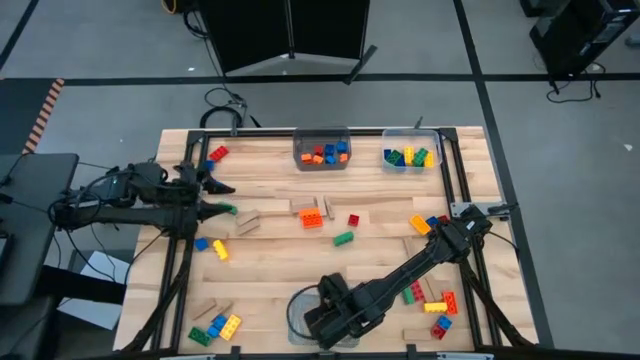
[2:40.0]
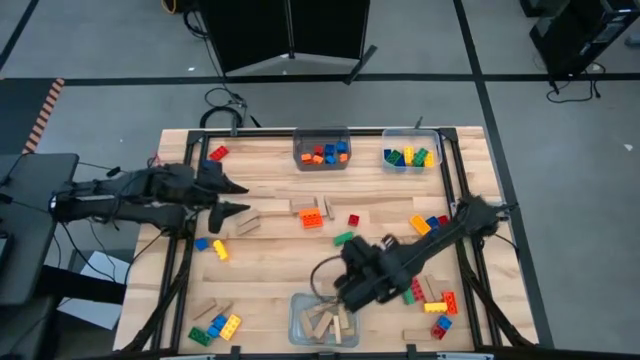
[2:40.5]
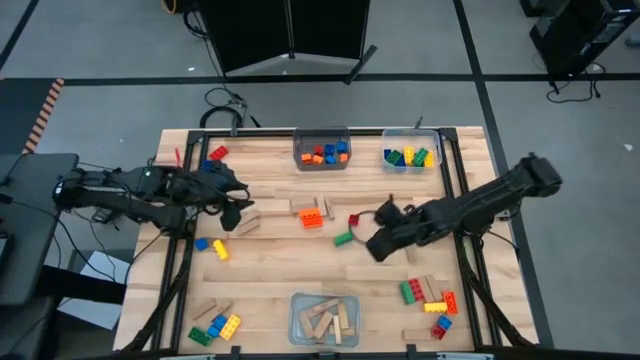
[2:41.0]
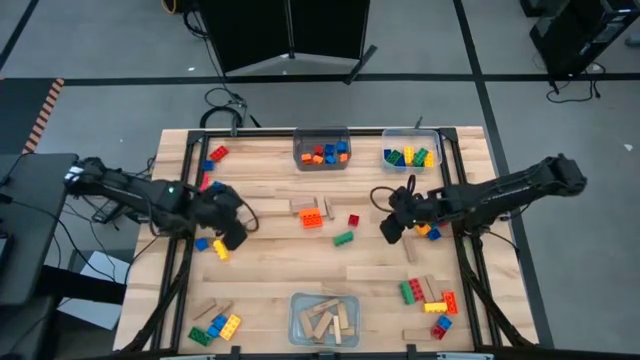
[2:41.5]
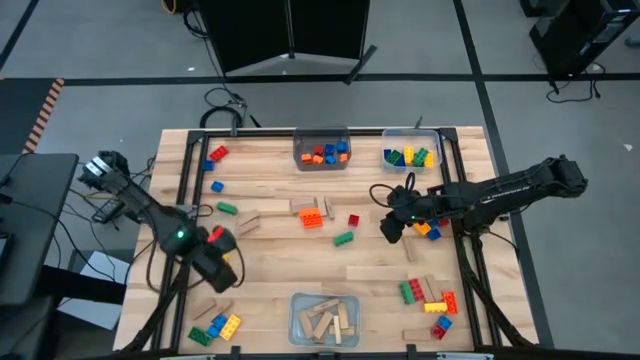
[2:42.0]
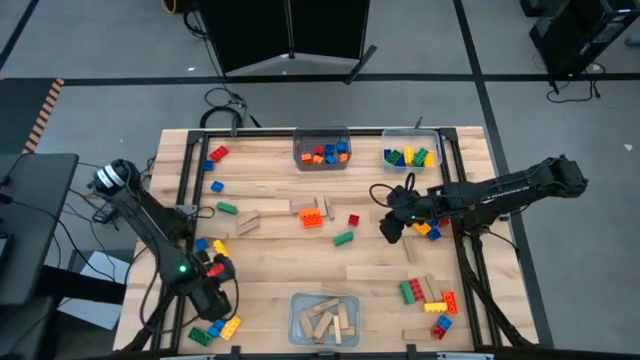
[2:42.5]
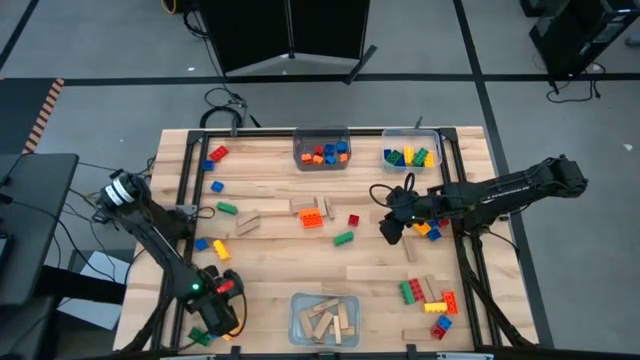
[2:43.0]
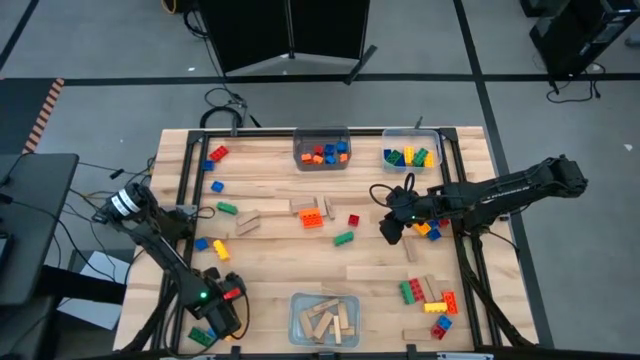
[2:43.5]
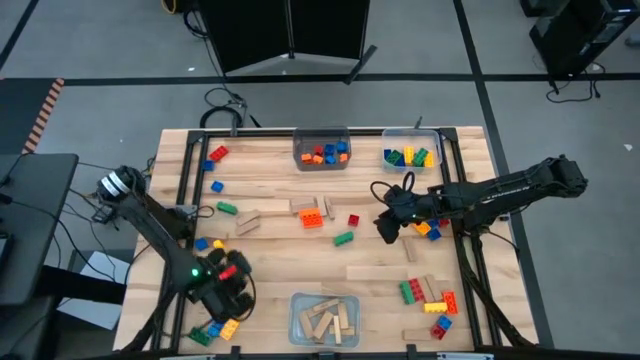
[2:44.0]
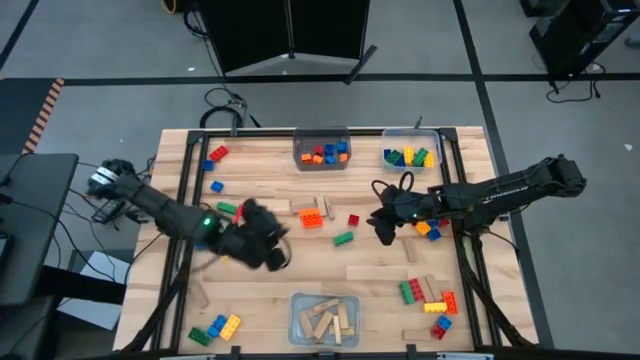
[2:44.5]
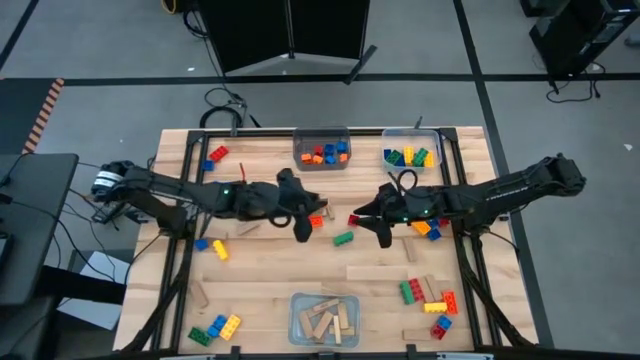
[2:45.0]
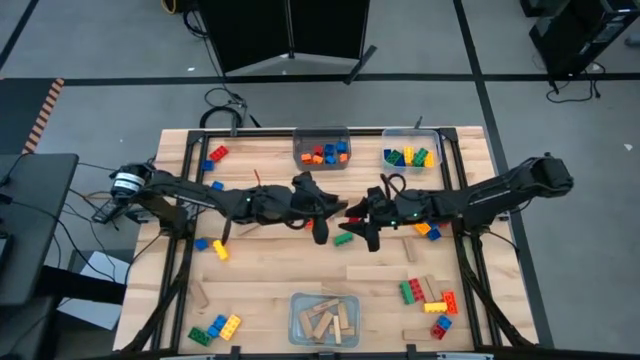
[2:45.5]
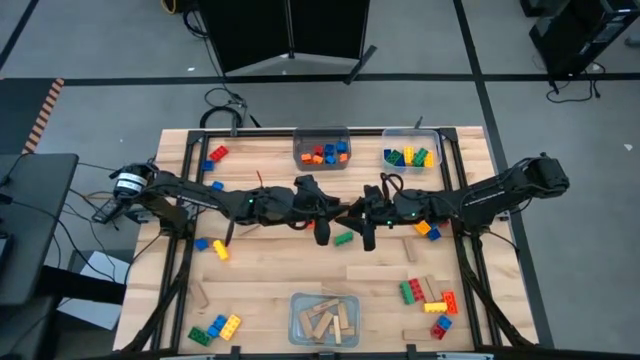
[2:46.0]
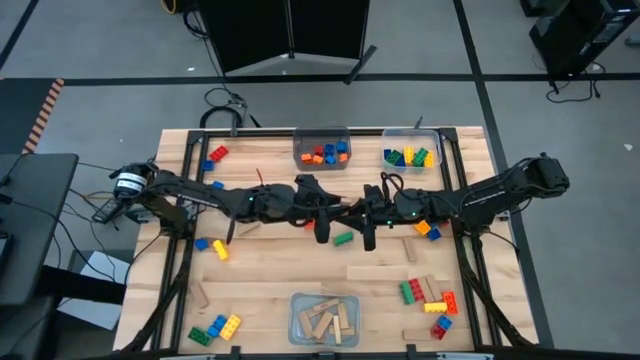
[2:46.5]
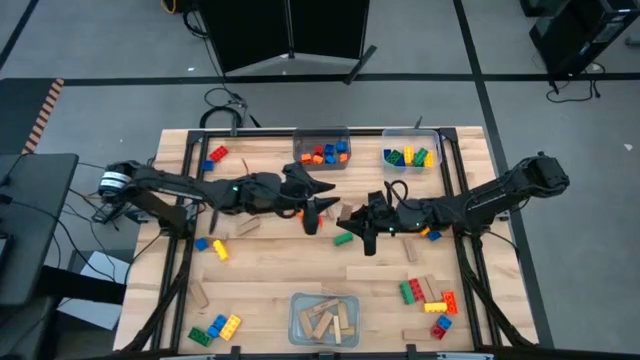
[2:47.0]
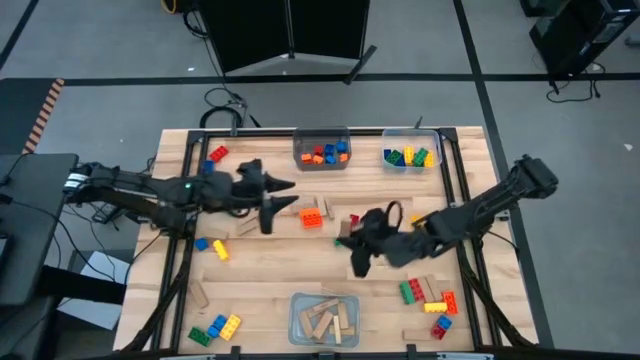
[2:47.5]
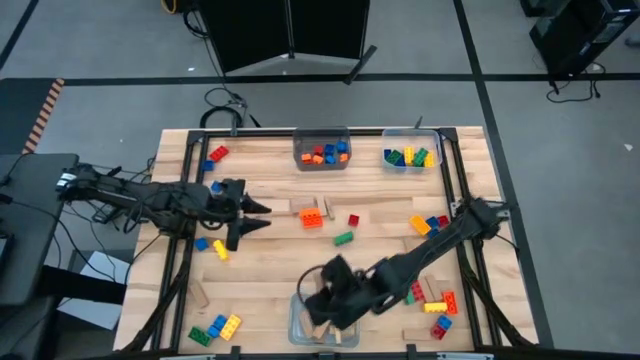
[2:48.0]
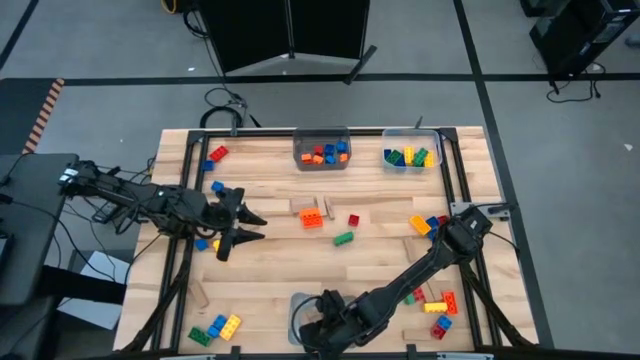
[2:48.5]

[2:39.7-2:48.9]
Task: Sort blocks by size
Put the brown block into the gray bin

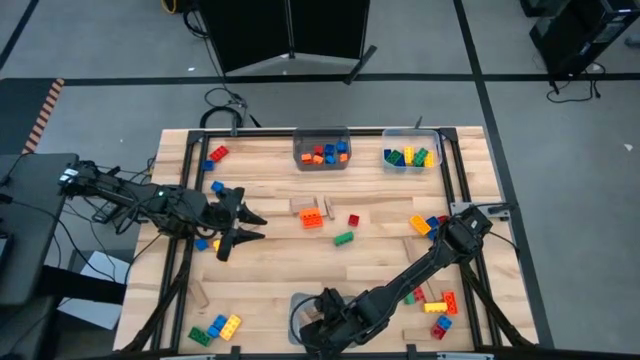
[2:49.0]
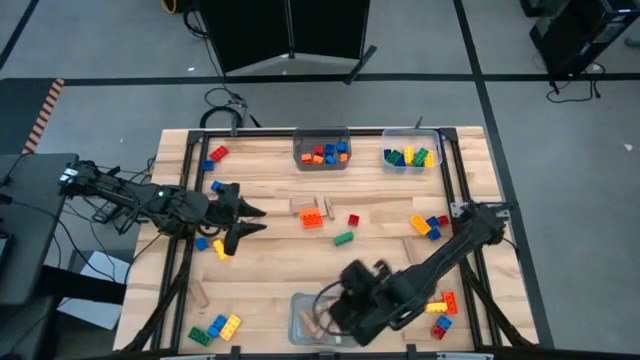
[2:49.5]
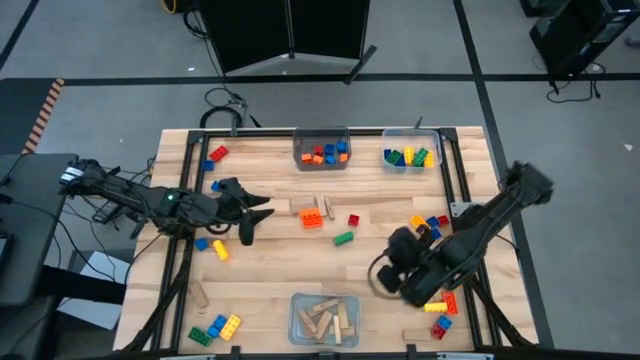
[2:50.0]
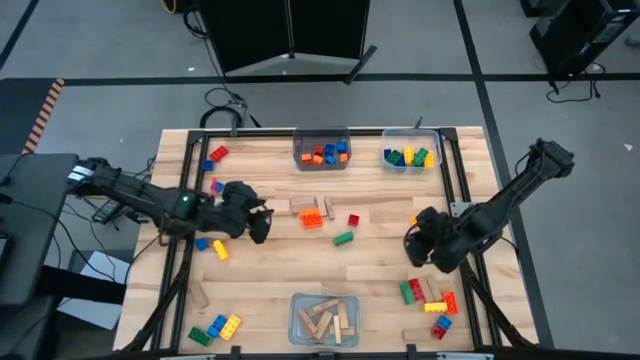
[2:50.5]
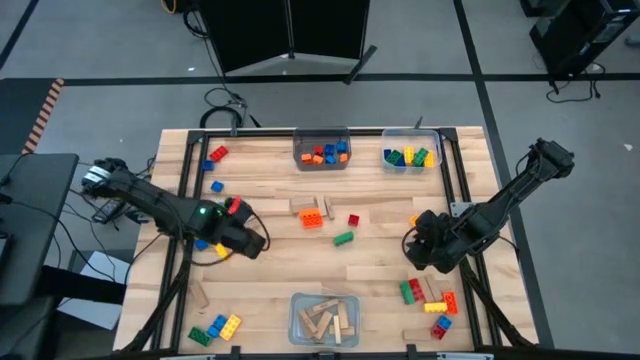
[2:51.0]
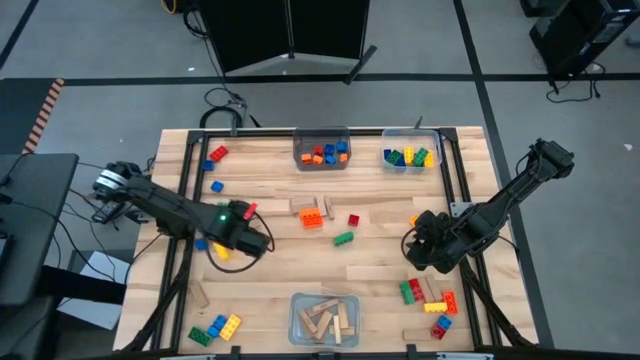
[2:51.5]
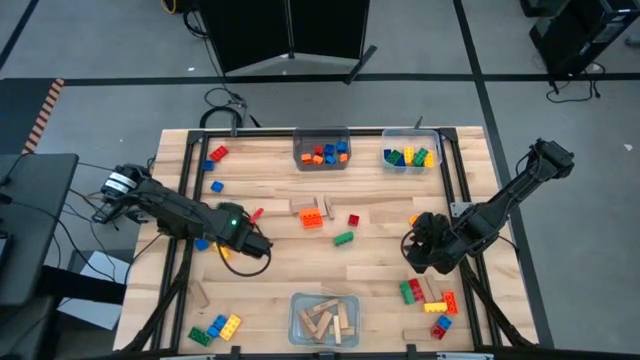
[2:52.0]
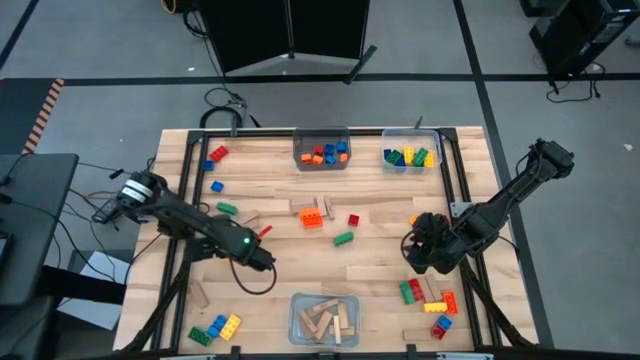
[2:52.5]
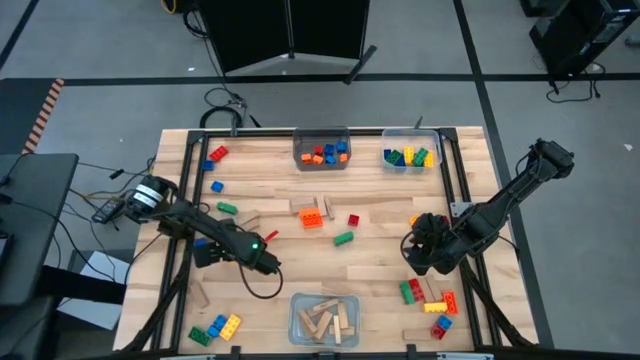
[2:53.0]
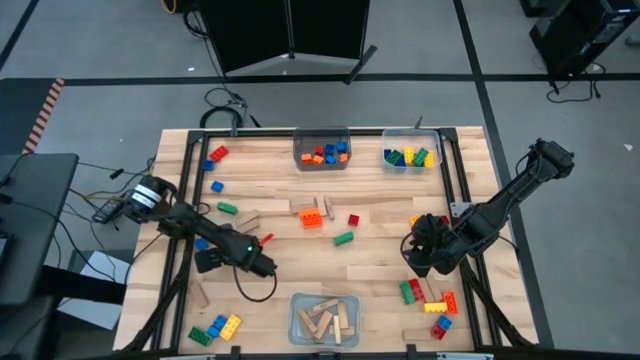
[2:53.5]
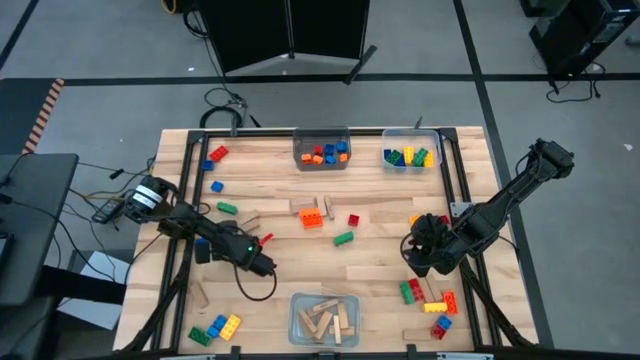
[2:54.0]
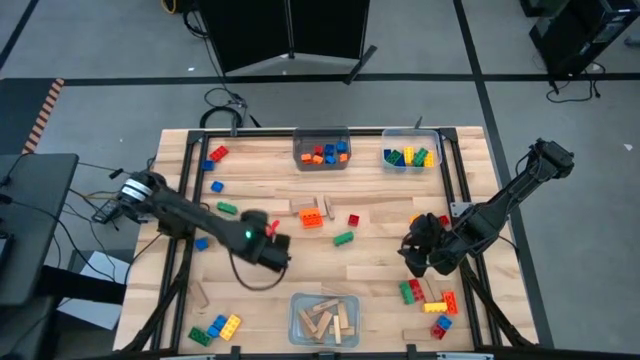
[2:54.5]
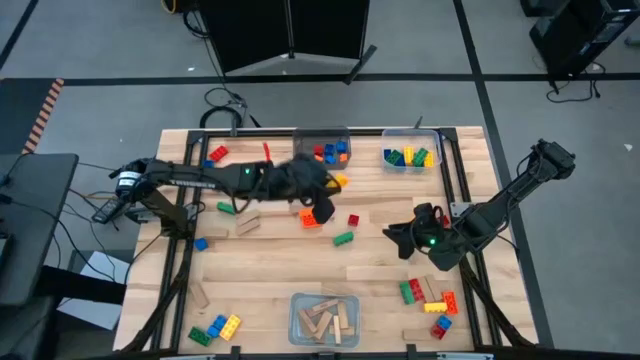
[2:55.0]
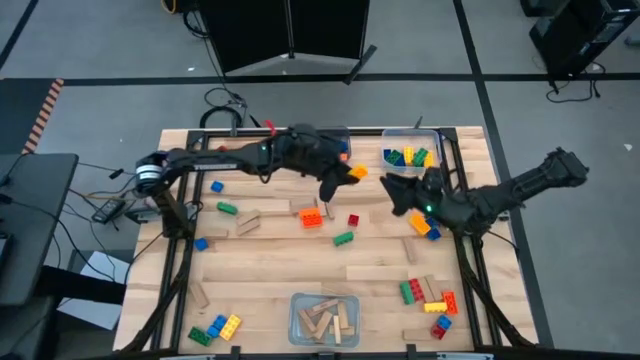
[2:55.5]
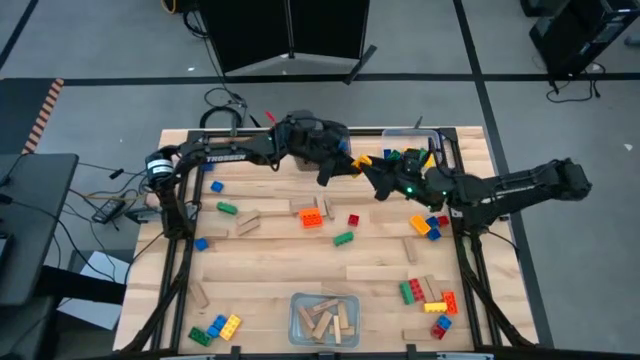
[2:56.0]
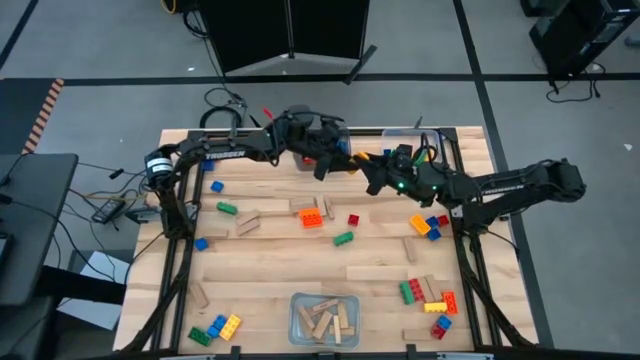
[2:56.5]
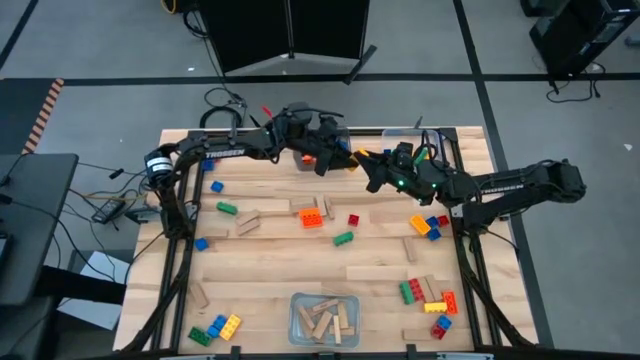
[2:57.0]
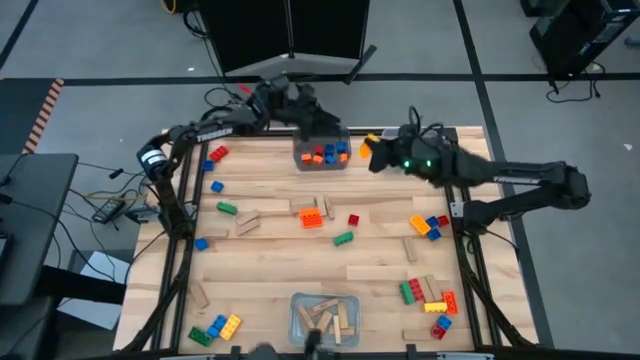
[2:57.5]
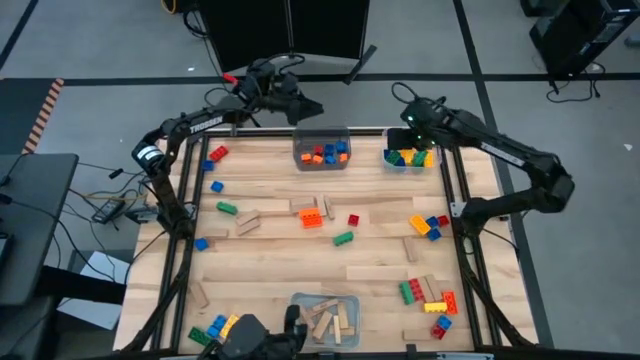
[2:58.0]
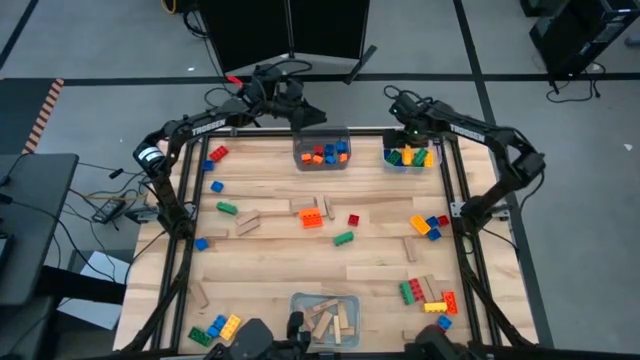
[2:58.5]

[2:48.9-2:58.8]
Put the large yellow game piece into the transparent bin

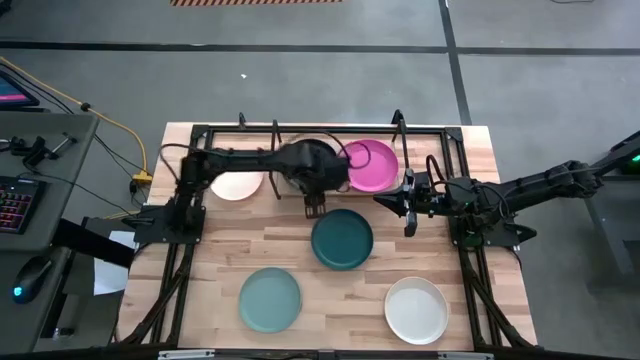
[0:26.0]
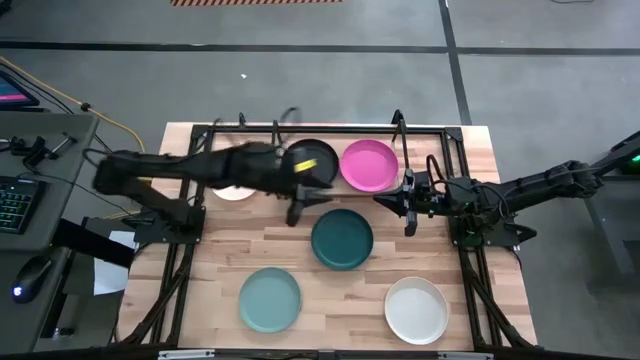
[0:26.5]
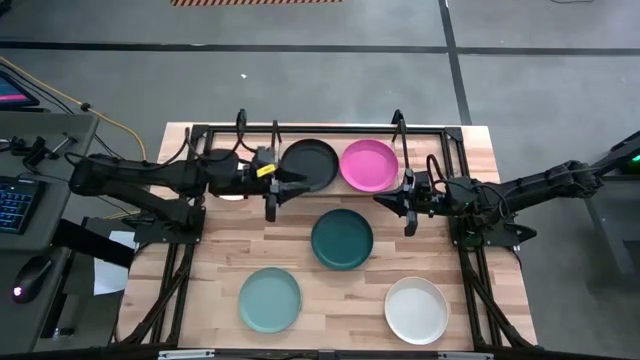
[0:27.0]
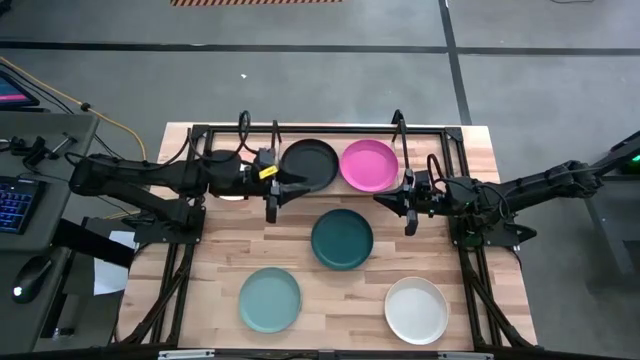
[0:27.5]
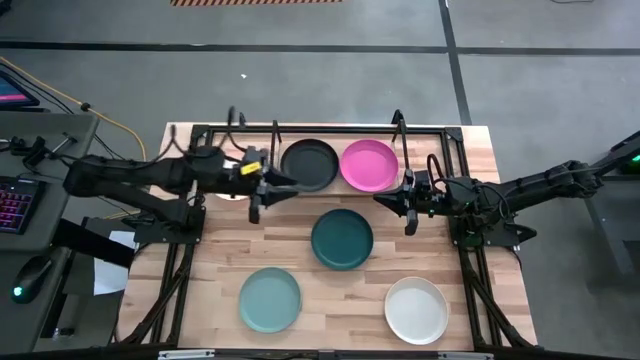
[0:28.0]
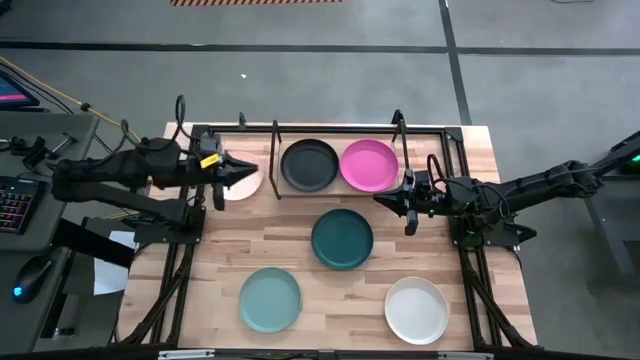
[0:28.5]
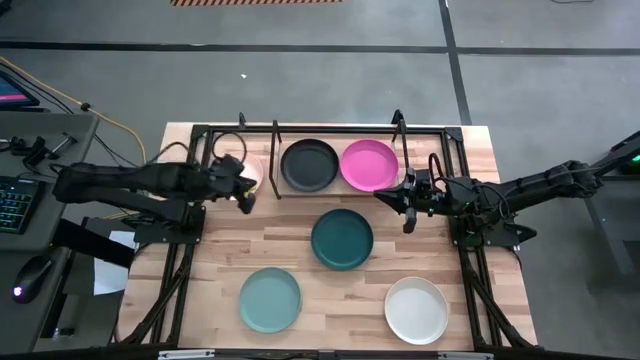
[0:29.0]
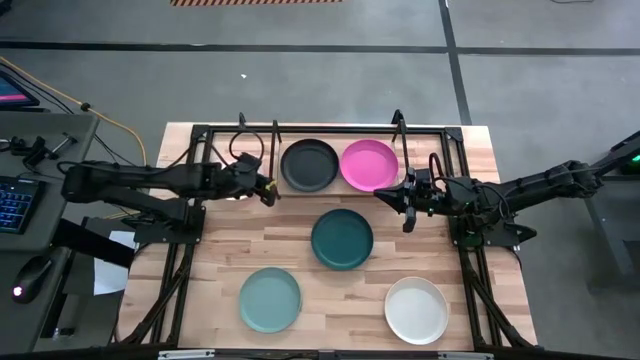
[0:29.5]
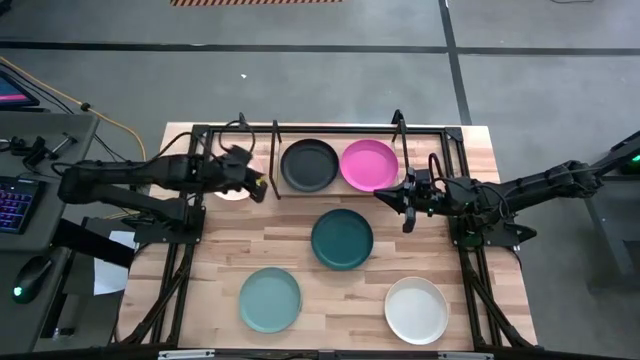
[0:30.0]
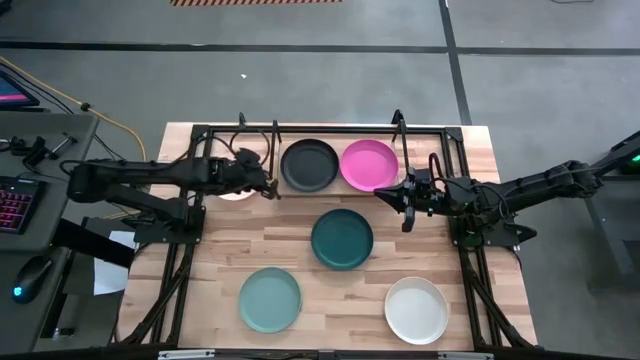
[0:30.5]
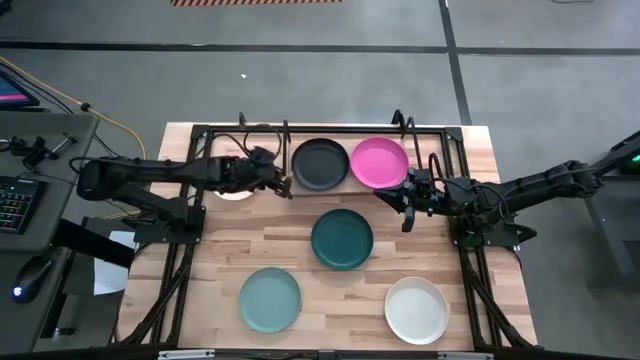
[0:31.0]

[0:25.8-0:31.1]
Task: Place and stack plates onto a shelf
Adjust the shelf
